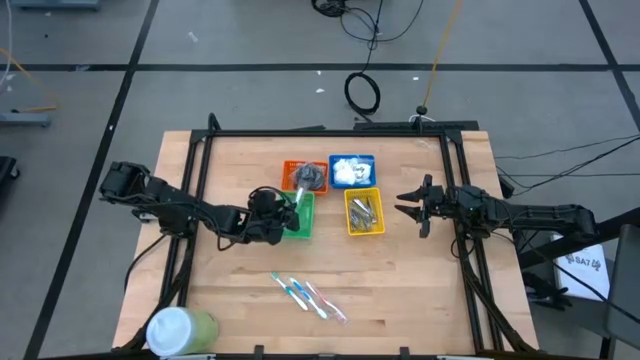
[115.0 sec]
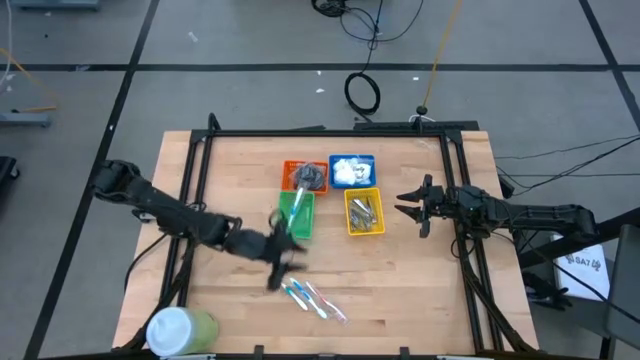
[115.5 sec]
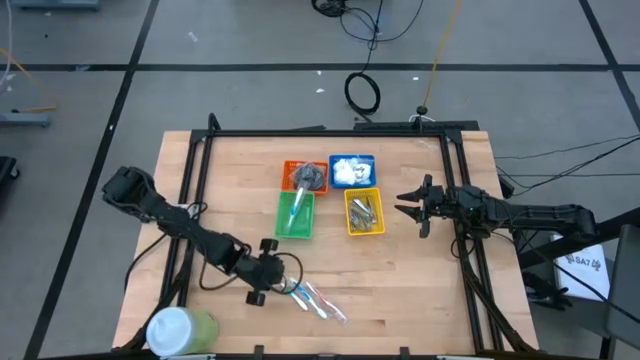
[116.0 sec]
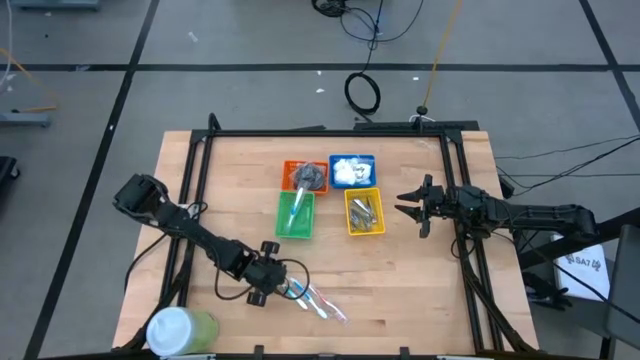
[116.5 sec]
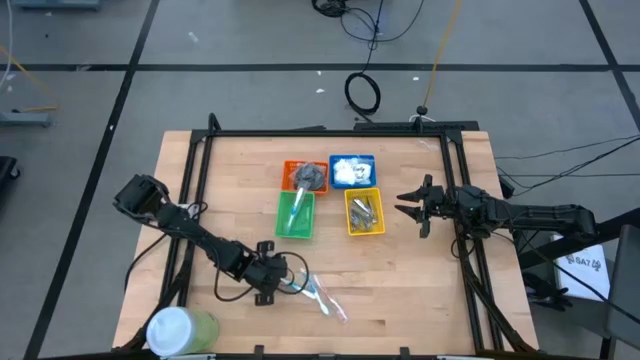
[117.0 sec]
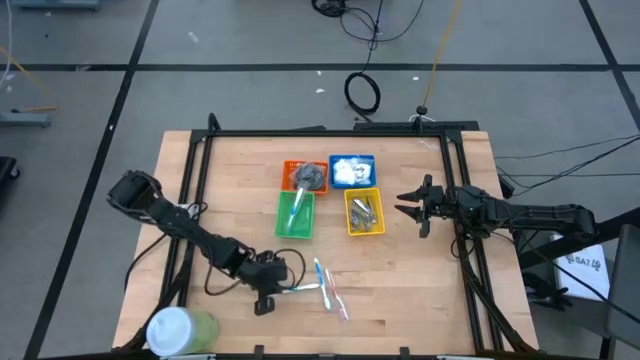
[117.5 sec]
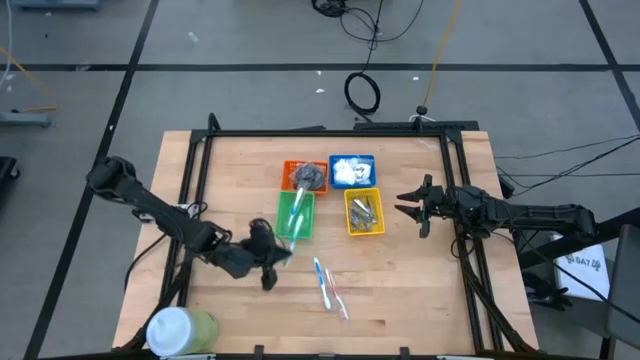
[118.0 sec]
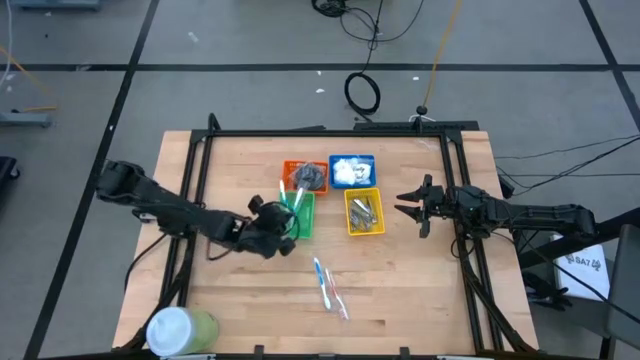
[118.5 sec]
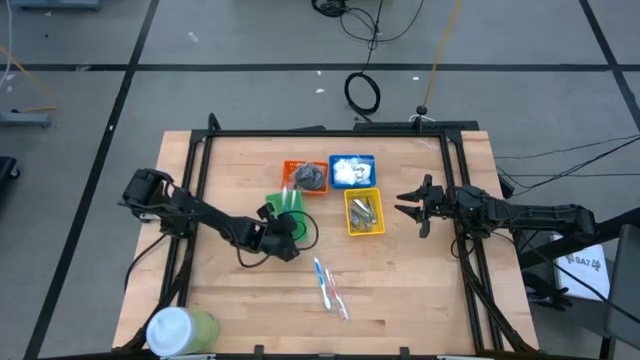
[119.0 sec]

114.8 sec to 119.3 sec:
Task: Pick & Place Travel size toiletries
Put the blue toothbrush into the green bin

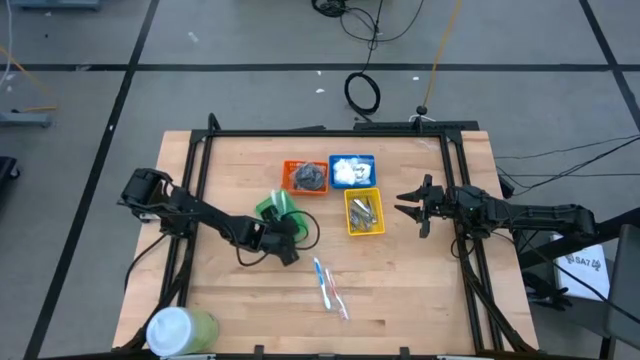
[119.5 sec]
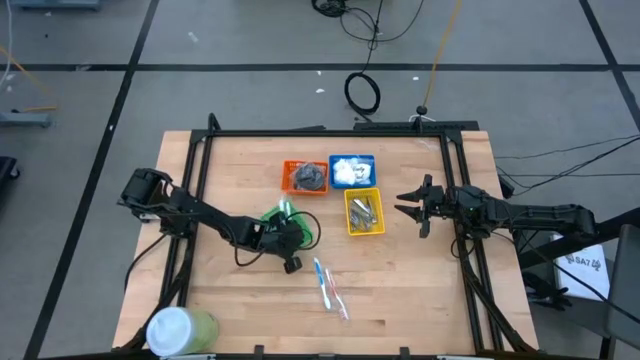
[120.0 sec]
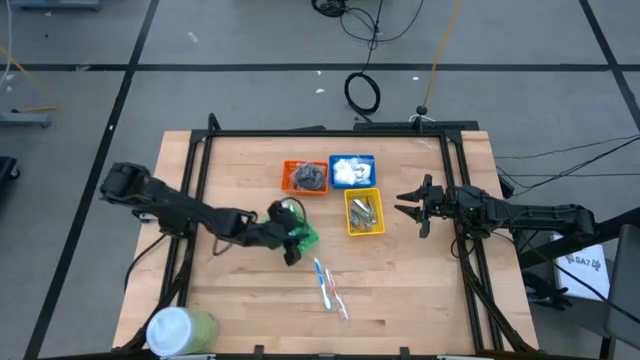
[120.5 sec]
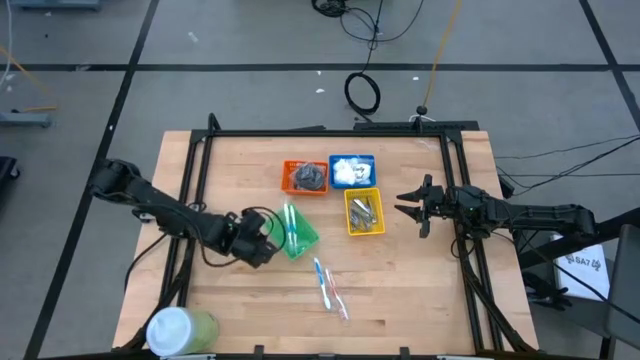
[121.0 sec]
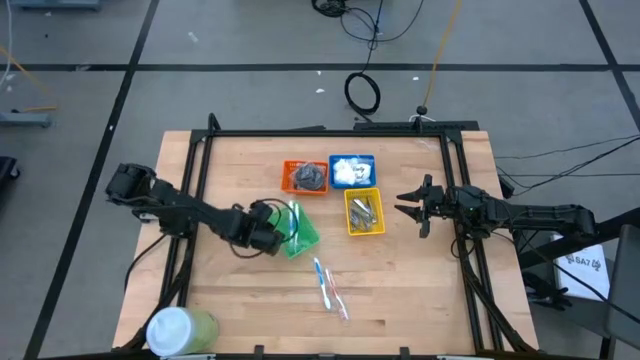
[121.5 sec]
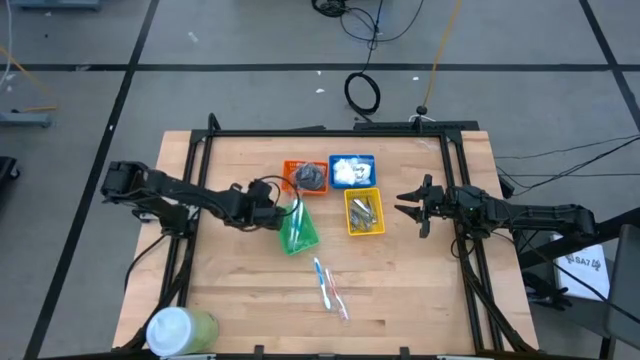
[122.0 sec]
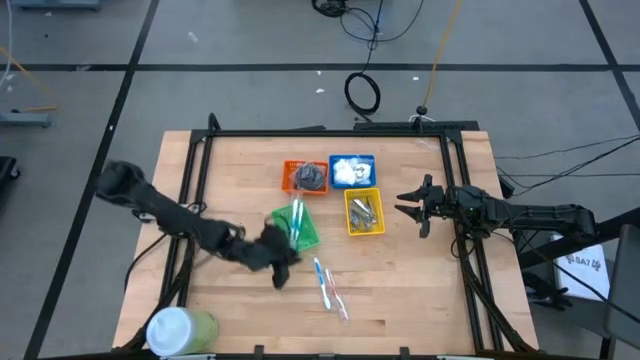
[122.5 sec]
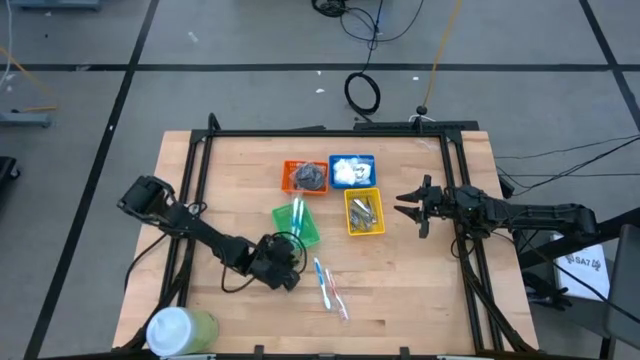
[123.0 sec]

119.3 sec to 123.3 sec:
Adjust the green bin

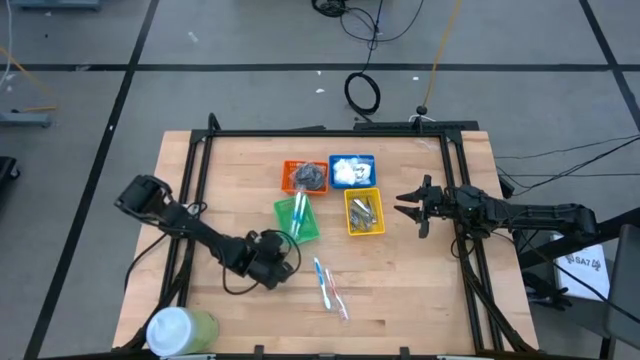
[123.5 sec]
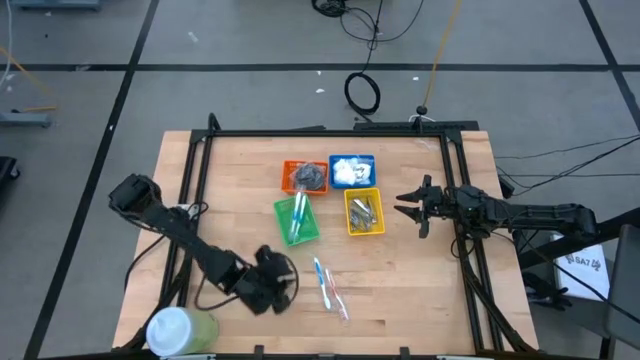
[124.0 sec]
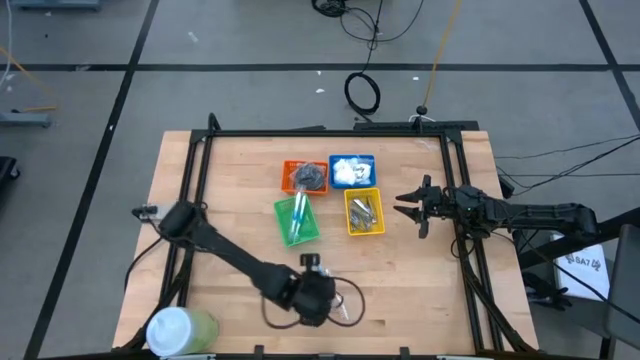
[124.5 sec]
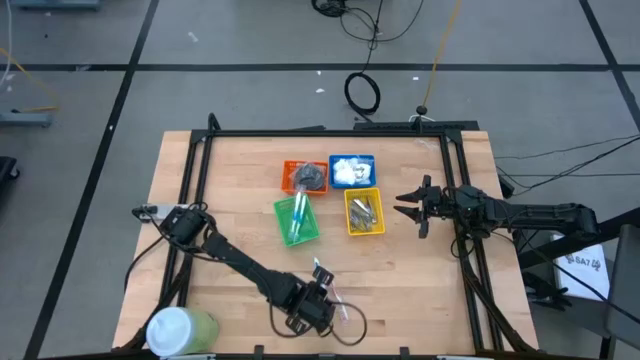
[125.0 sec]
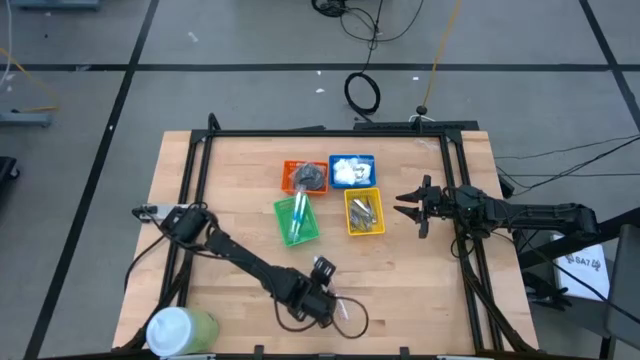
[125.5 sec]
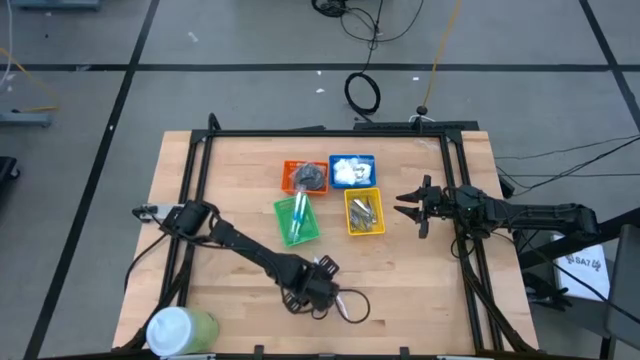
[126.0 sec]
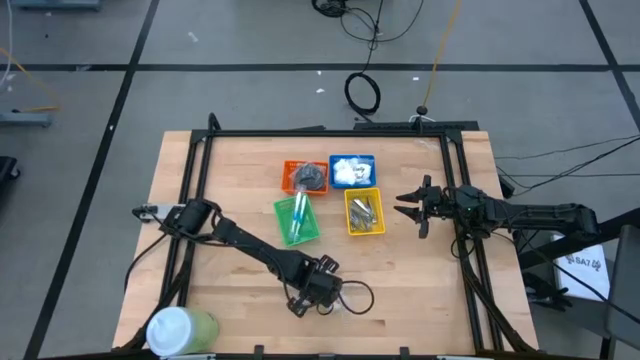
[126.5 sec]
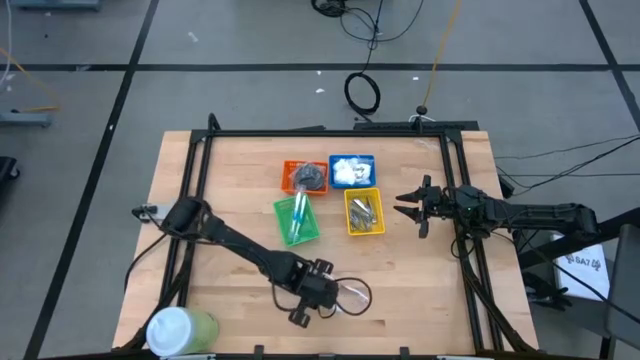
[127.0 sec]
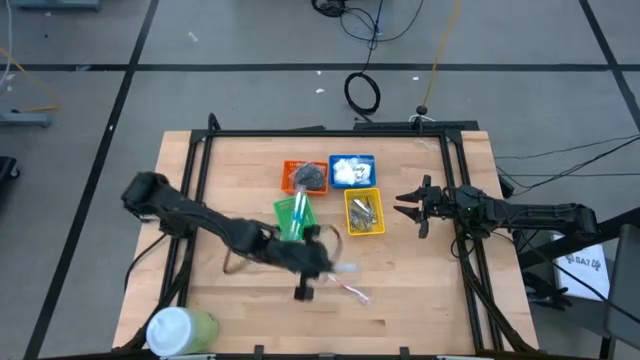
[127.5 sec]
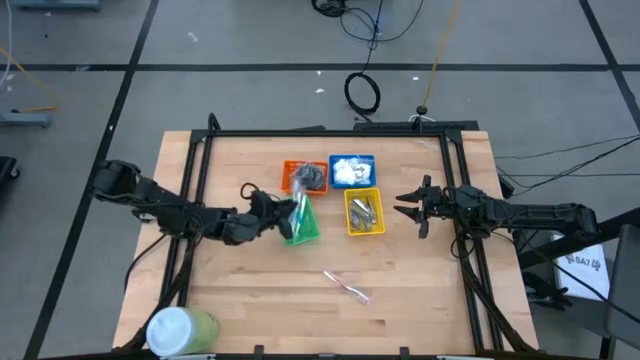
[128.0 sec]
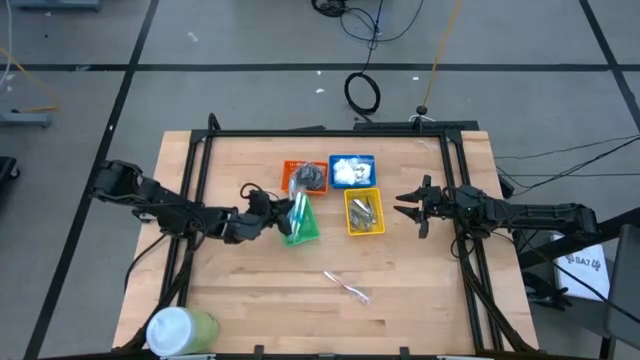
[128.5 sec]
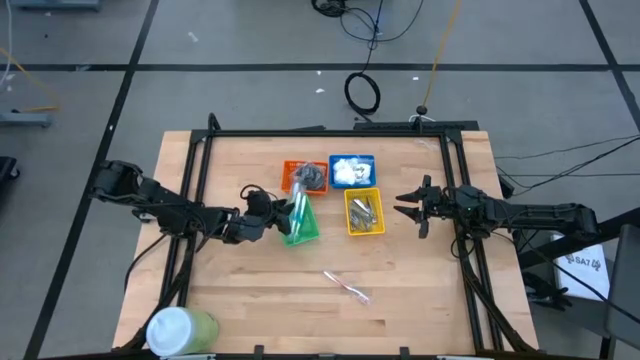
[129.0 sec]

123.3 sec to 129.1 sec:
Put the blue toothbrush into the green bin

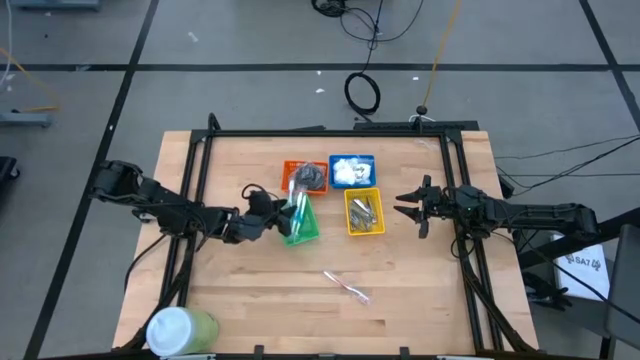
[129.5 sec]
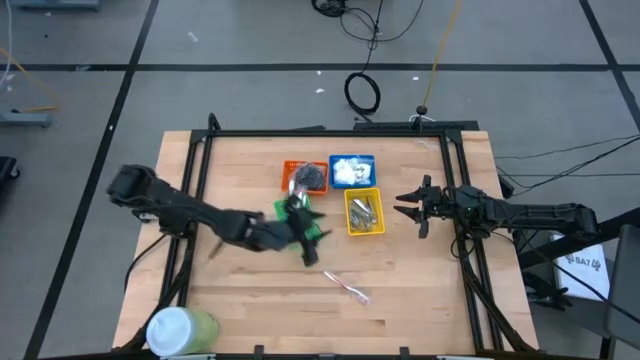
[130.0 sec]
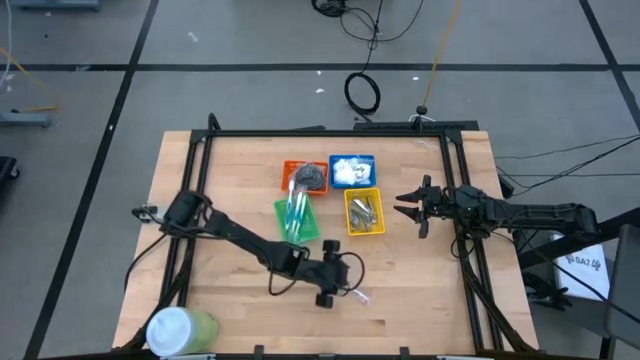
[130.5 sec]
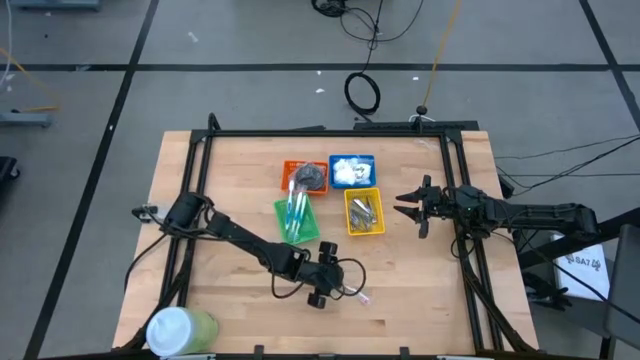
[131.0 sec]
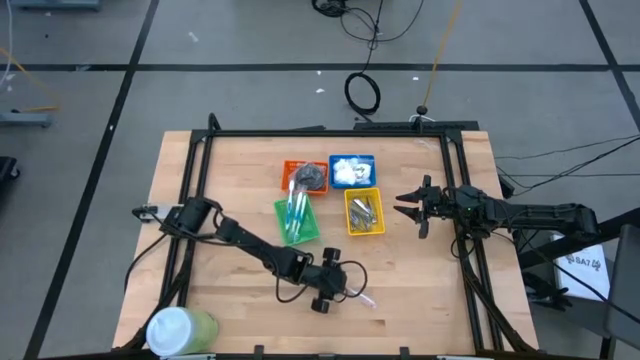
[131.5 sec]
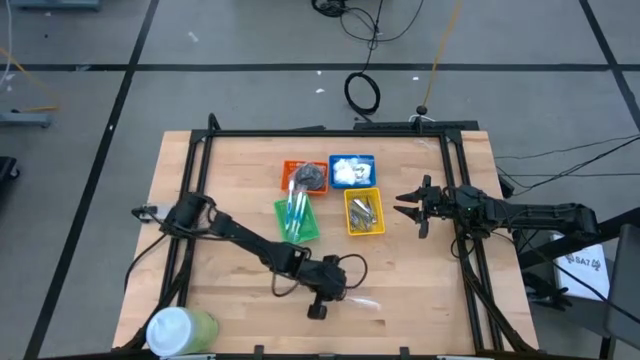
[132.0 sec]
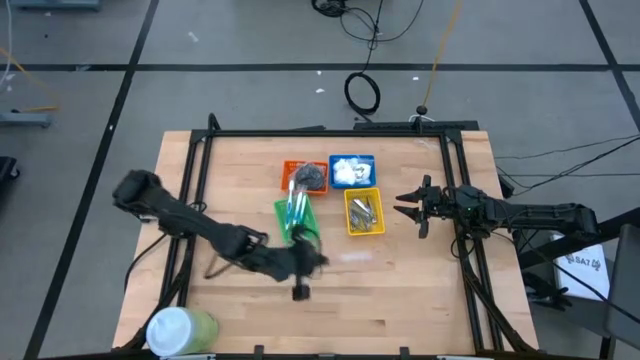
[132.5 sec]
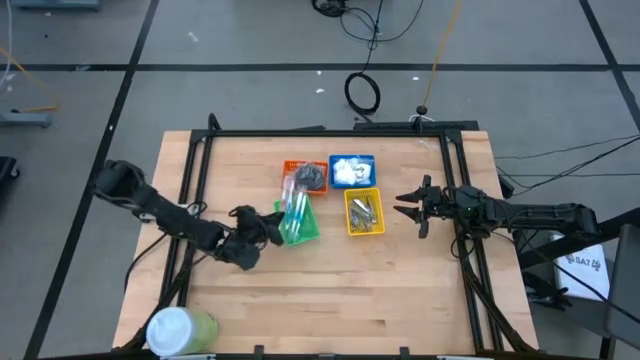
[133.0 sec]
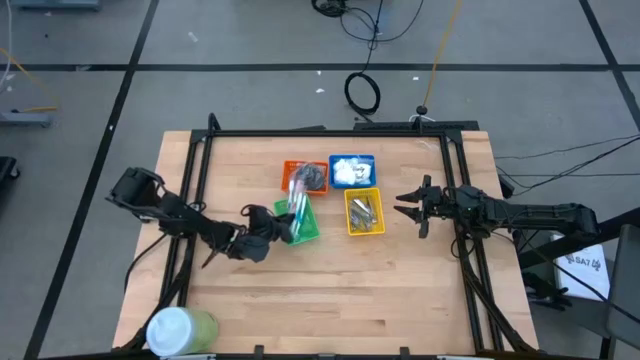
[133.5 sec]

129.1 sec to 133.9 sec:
Put the orange toothbrush into the green bin

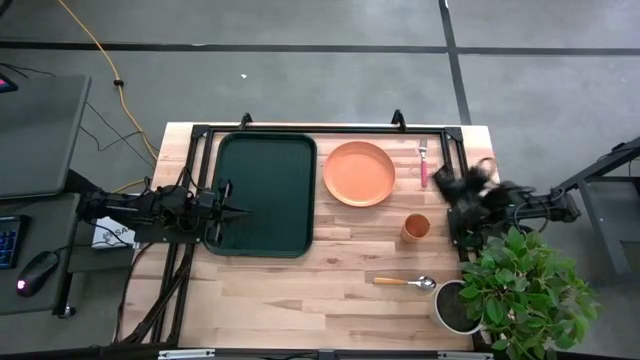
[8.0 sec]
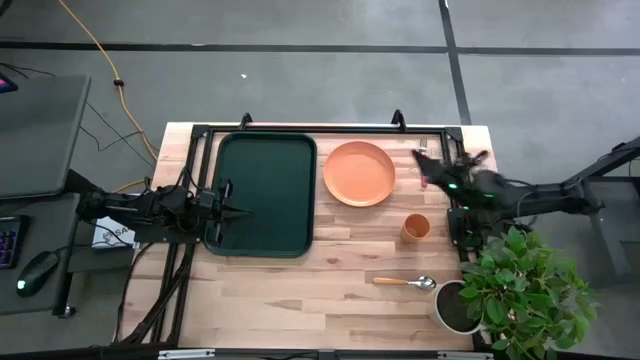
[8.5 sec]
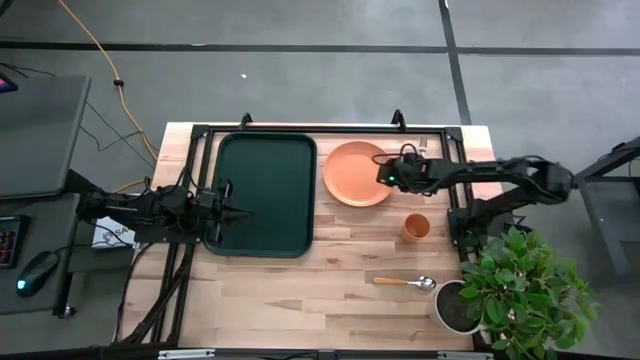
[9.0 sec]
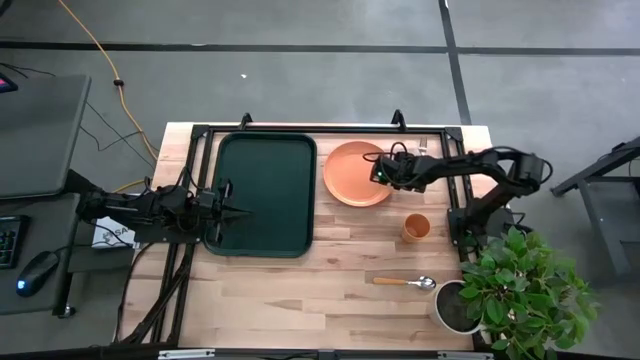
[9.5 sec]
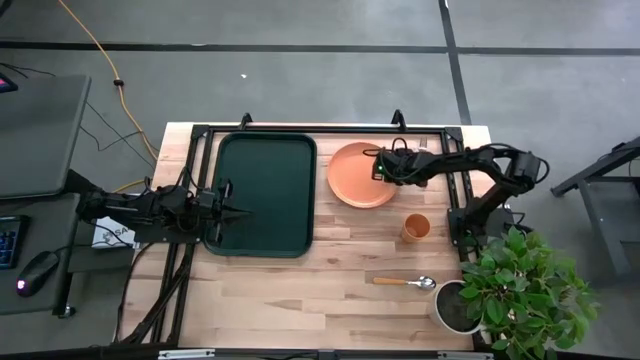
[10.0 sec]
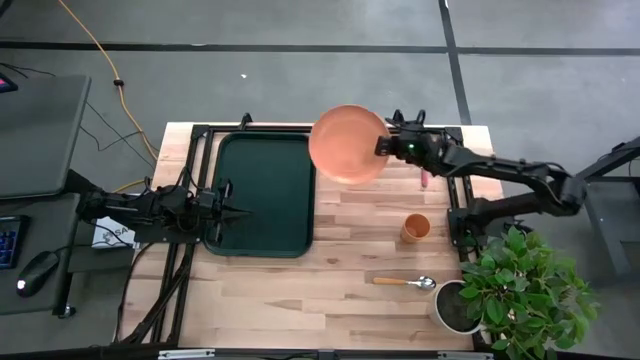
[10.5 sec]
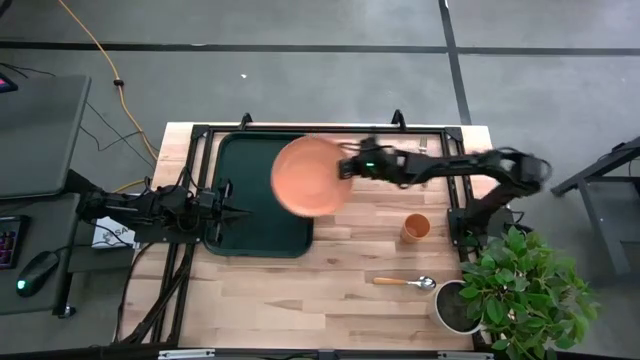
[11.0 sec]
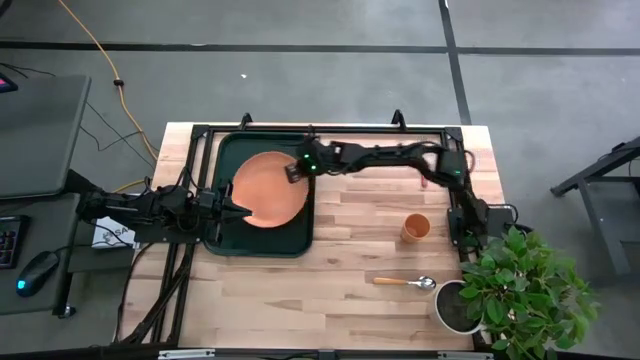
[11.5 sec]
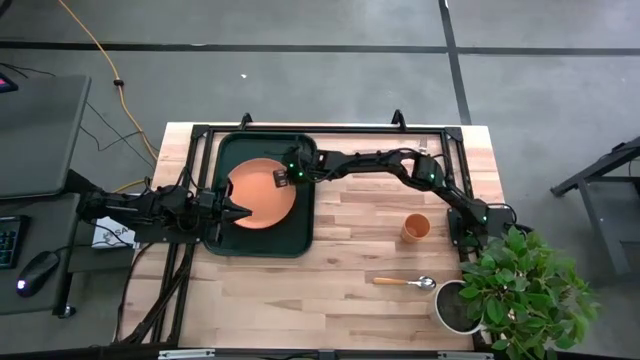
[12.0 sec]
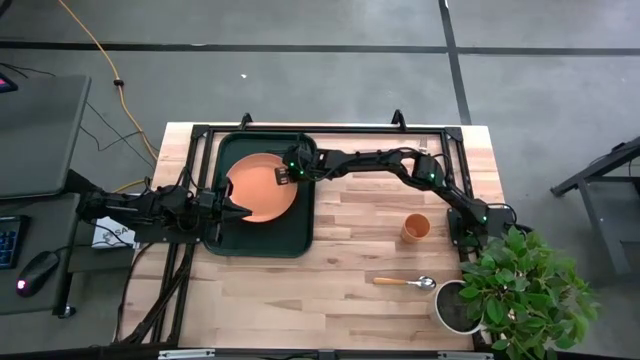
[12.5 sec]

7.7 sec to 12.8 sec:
Task: Pick and place plate/cup/fork/spoon on tray
Put the orange plate on the center of the black serving tray
